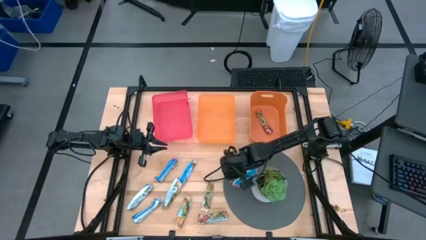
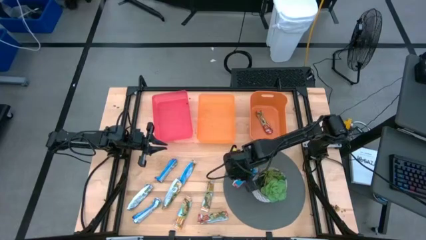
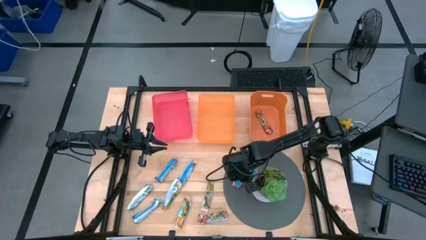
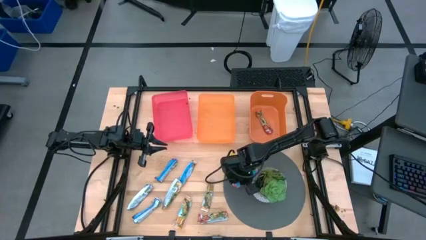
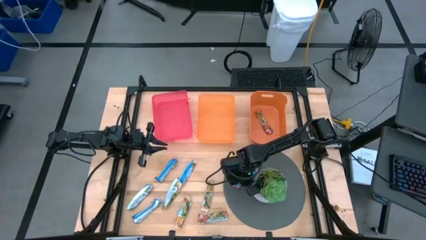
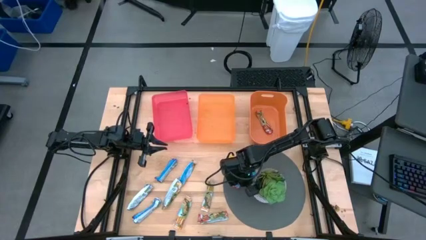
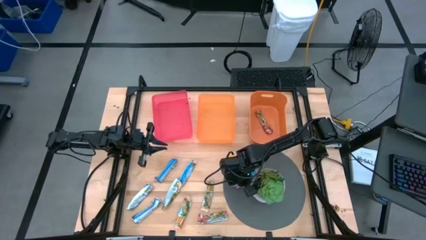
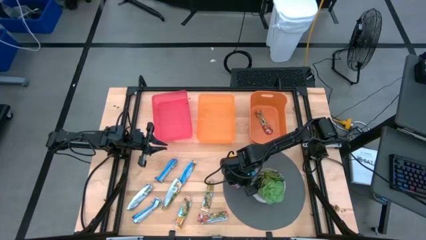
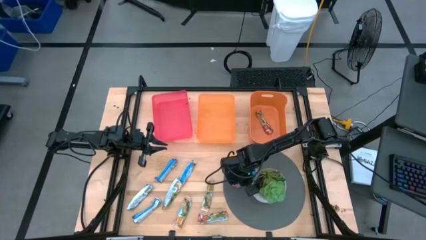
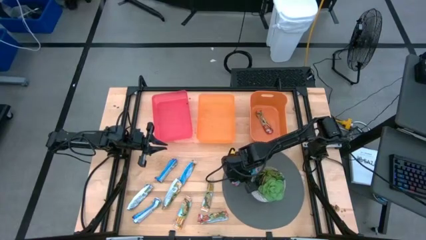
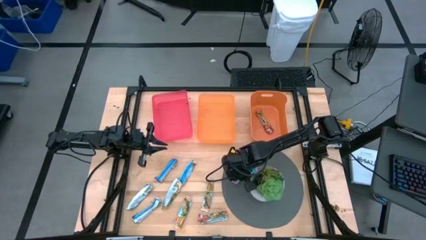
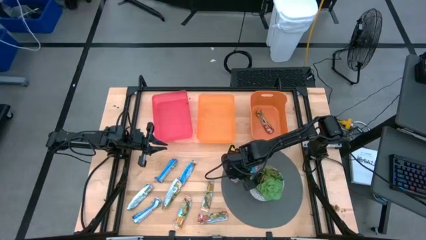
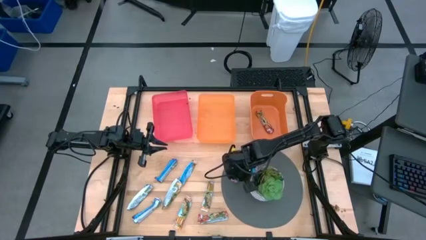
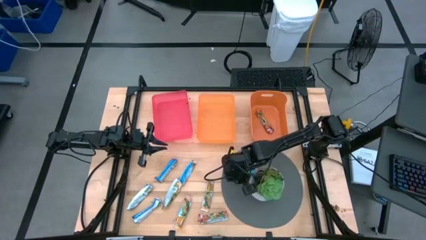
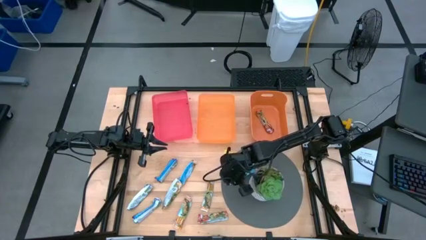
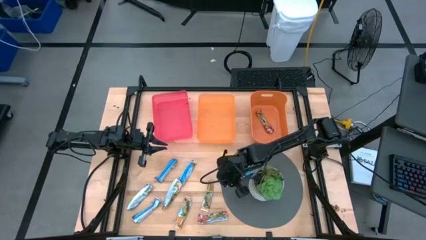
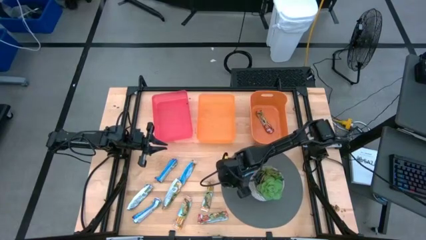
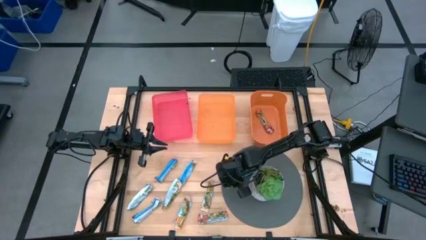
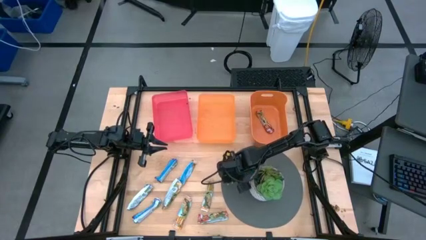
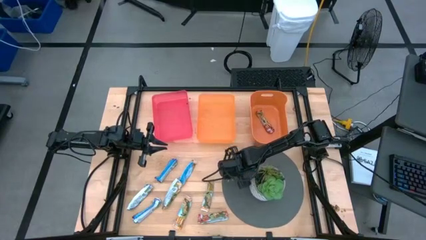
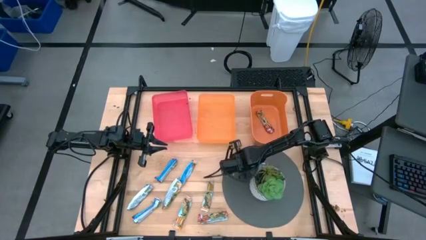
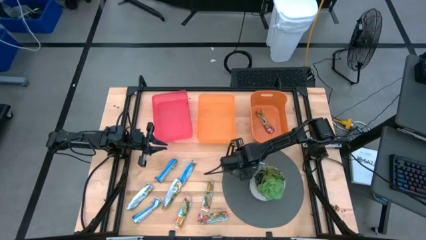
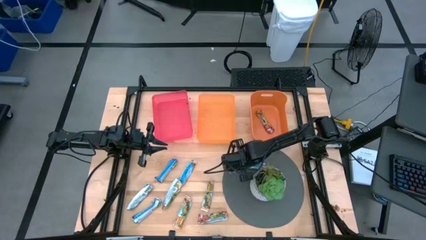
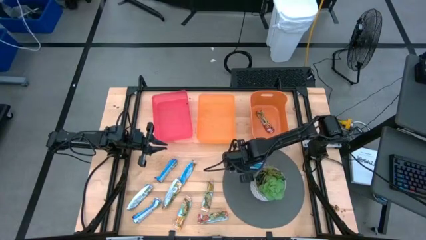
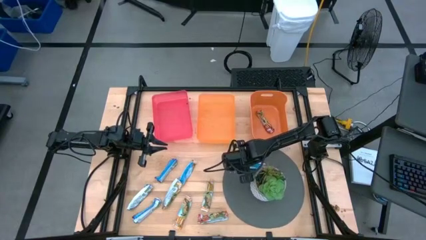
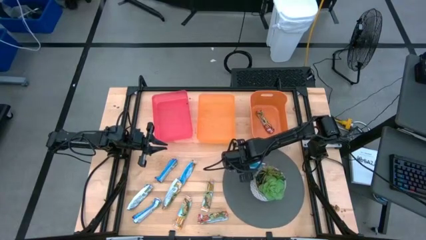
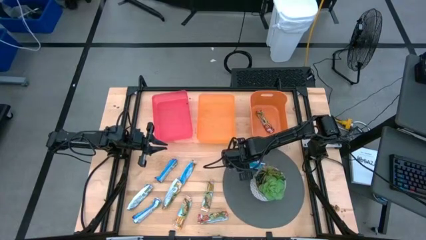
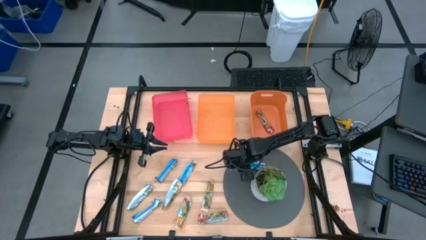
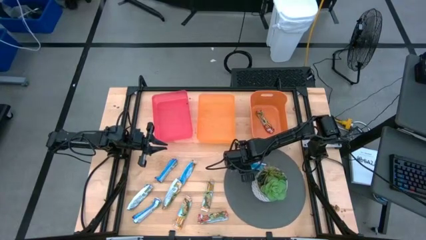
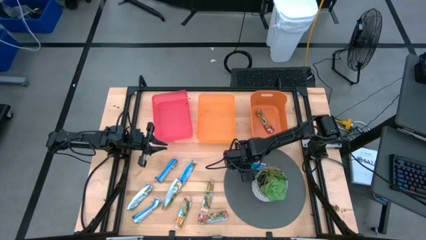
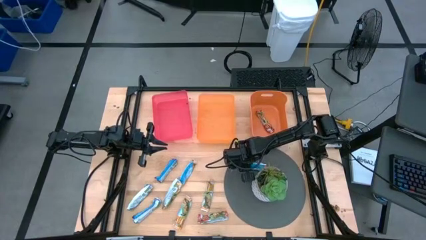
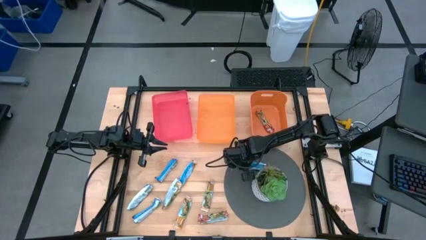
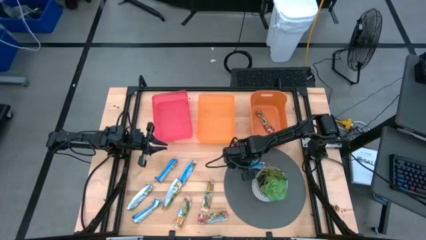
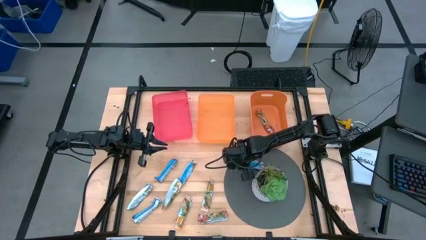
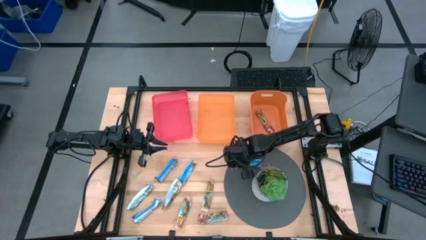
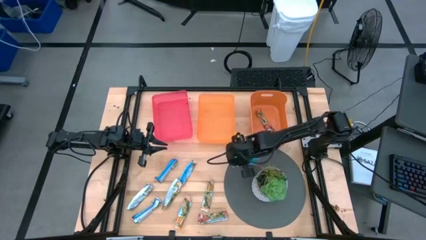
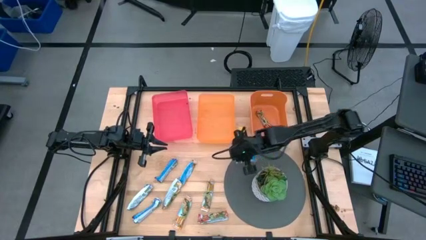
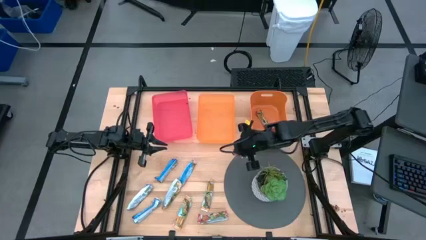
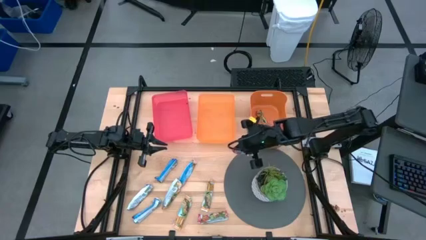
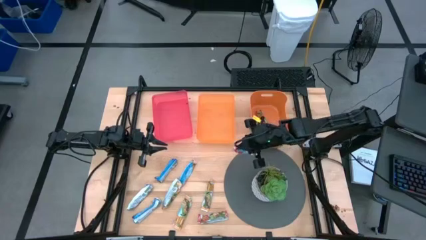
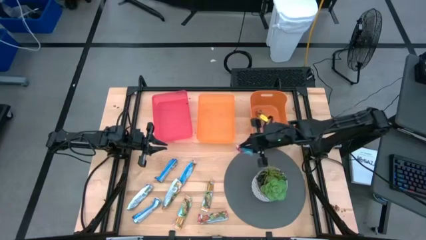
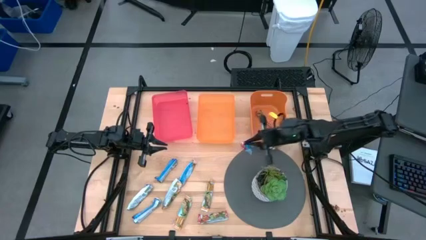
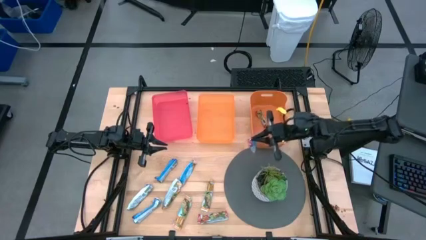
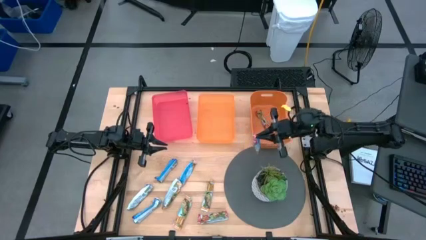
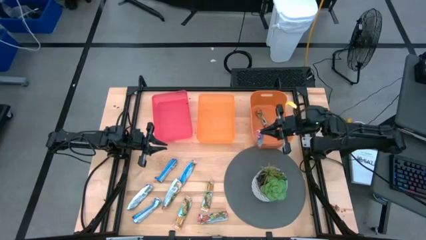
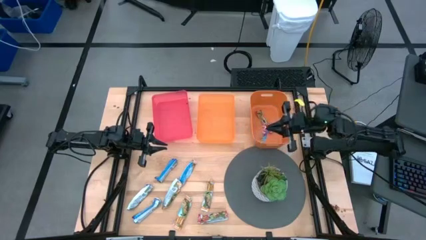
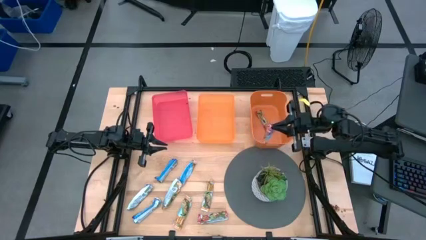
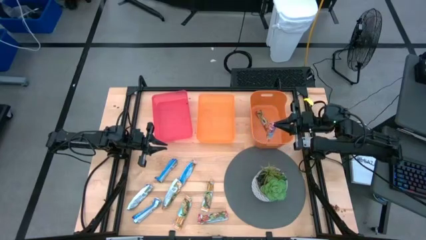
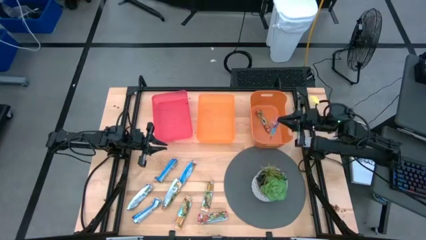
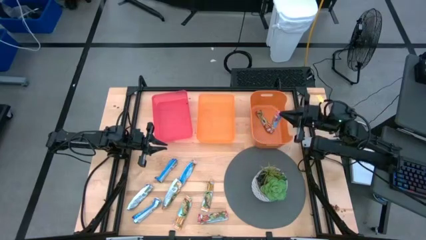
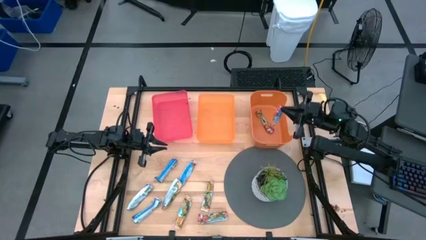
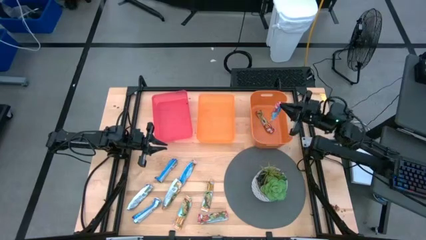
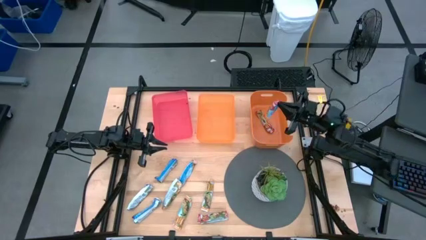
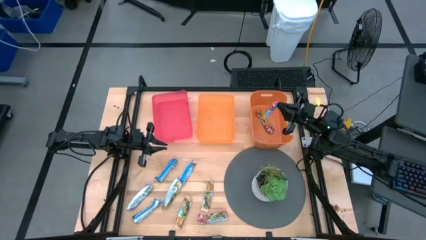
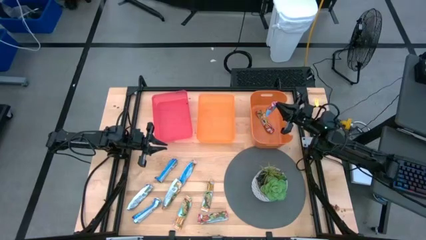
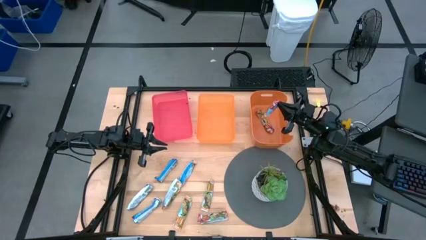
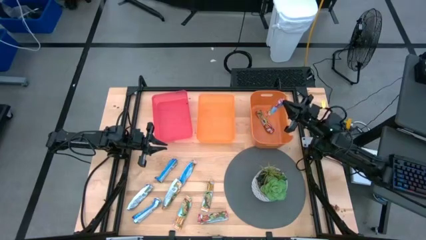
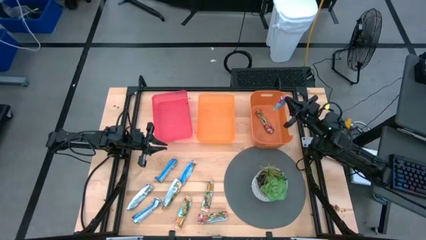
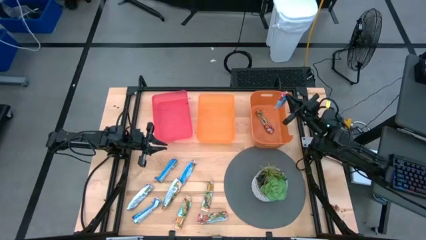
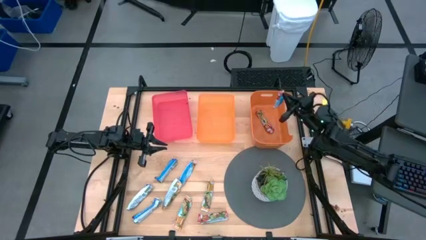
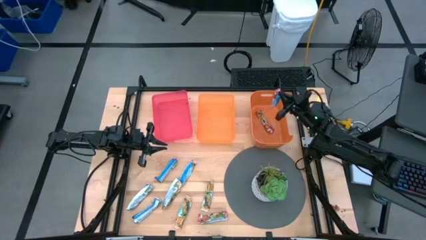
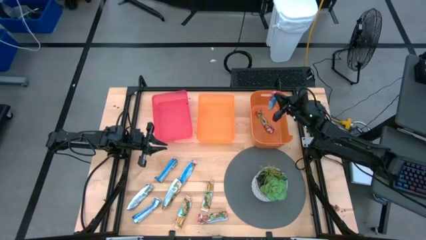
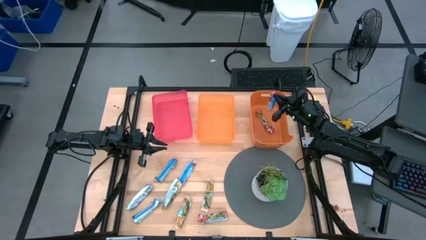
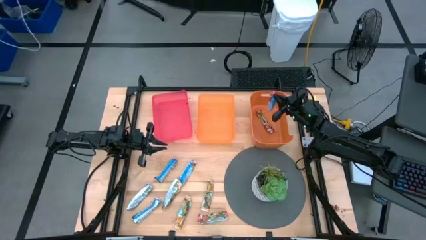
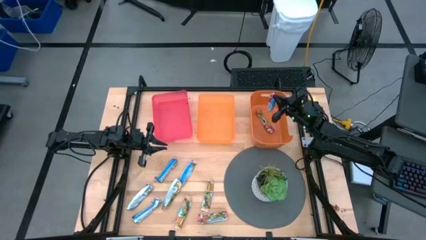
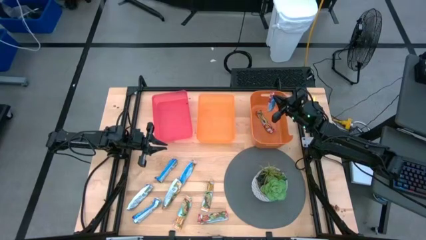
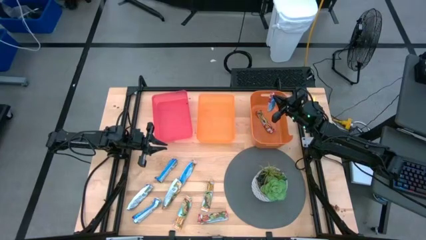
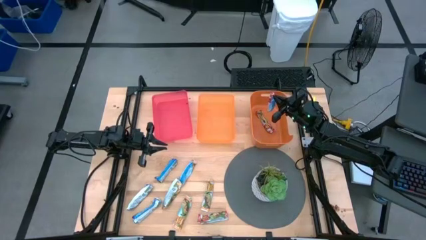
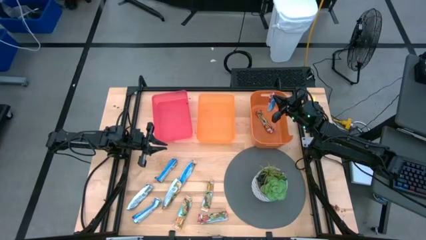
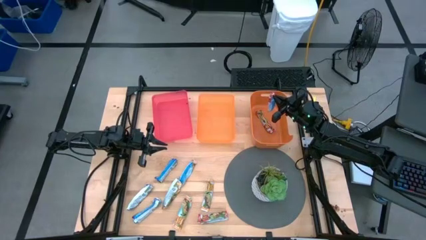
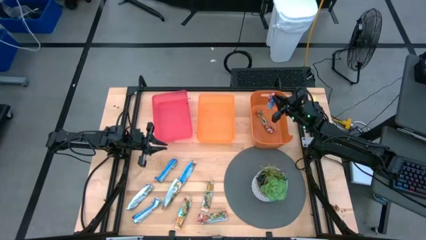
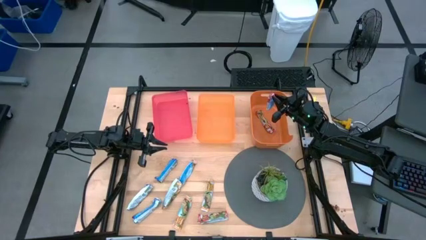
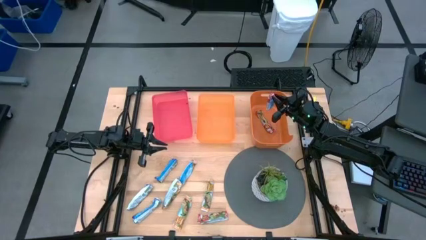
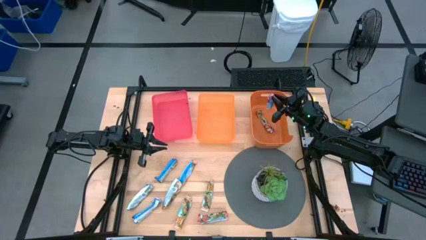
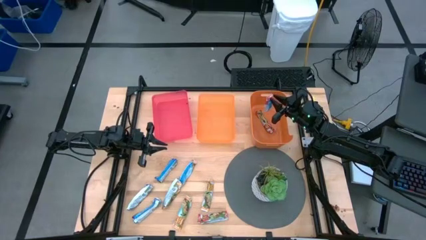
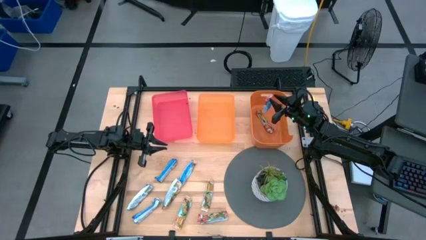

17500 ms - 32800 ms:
Task: Pick and place Granola Bars by type
Put the top red granola bar into the right orange bin
